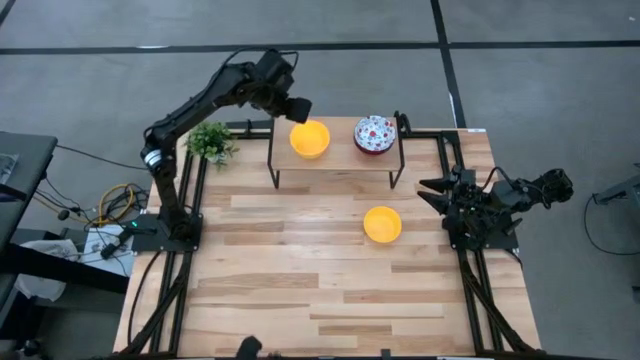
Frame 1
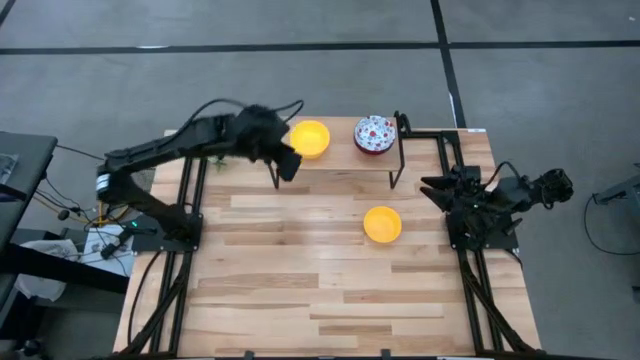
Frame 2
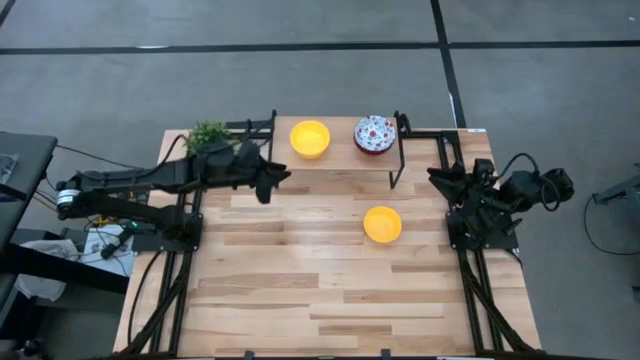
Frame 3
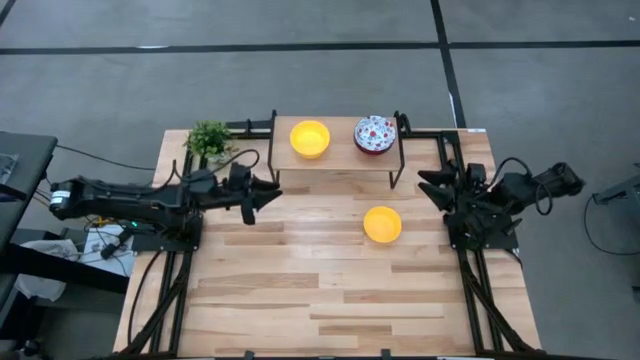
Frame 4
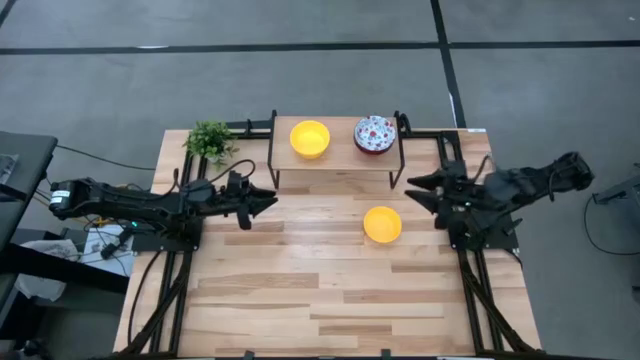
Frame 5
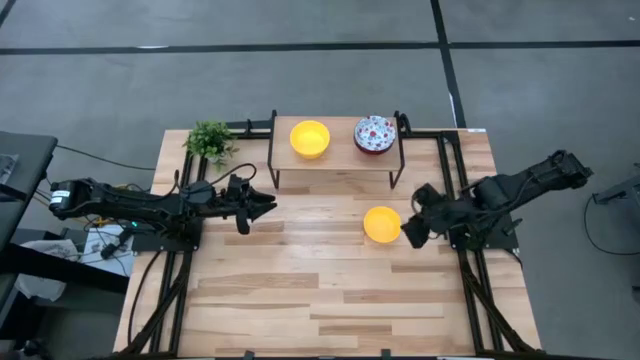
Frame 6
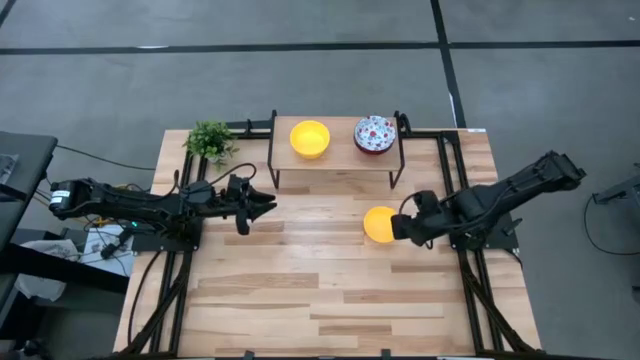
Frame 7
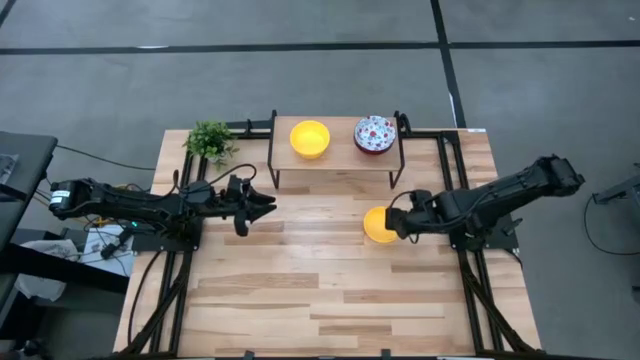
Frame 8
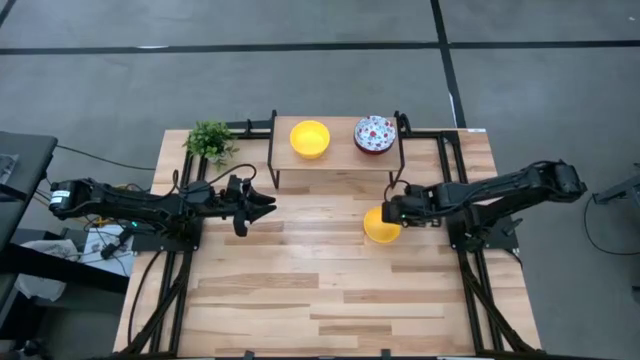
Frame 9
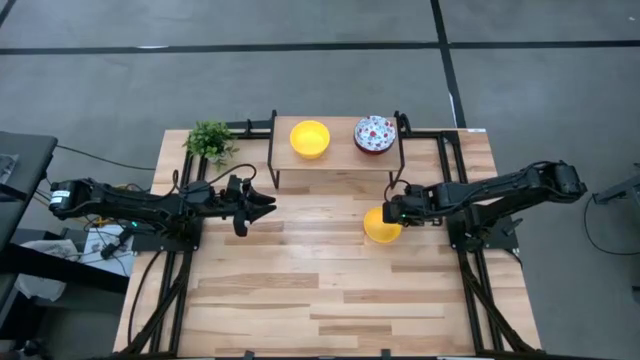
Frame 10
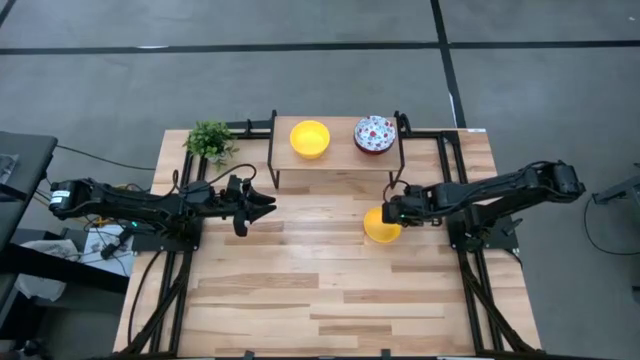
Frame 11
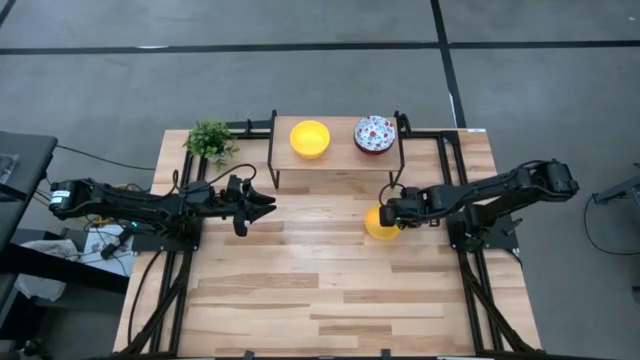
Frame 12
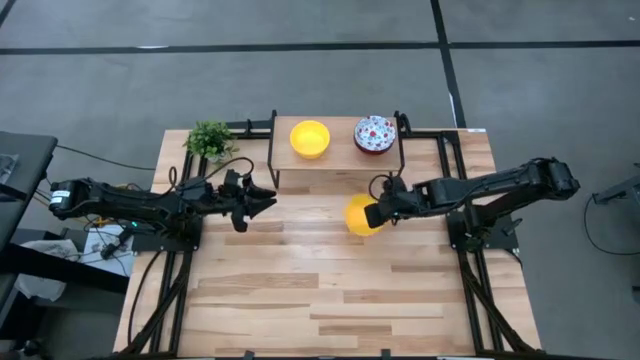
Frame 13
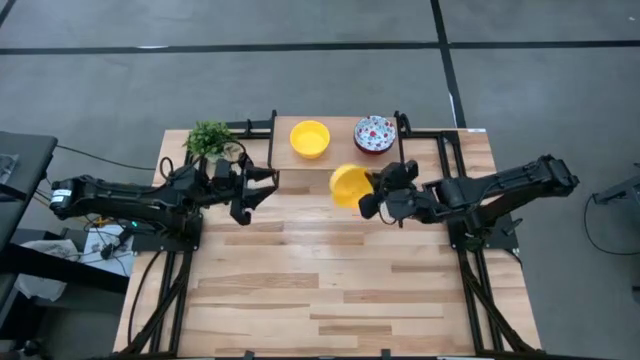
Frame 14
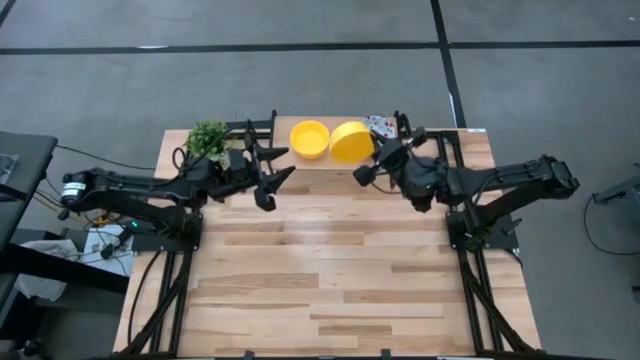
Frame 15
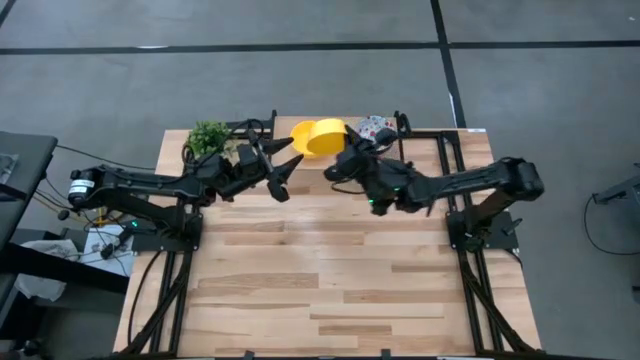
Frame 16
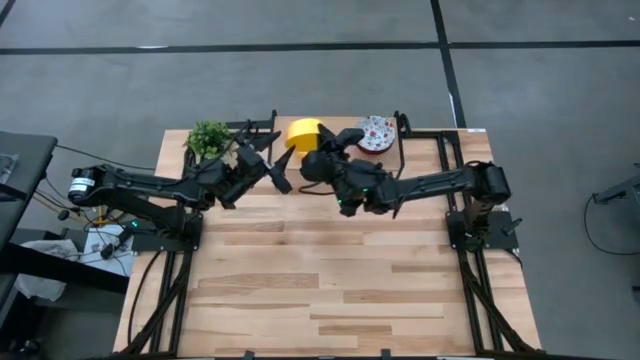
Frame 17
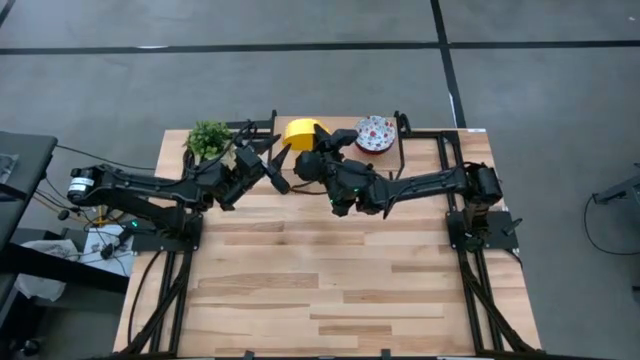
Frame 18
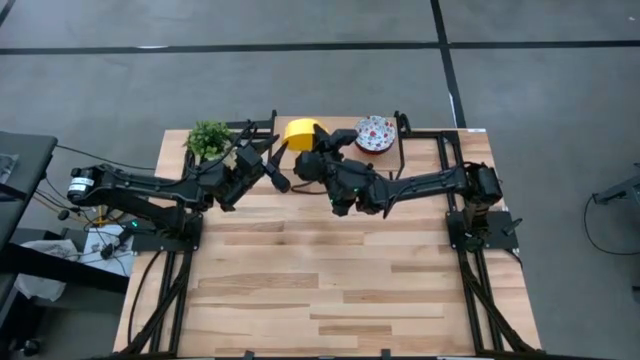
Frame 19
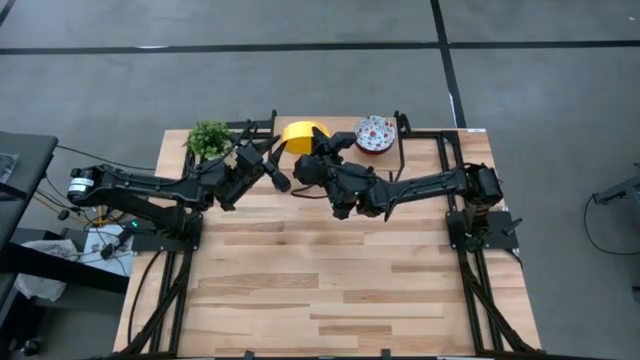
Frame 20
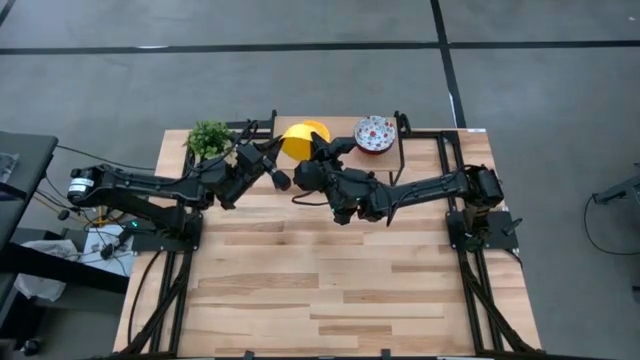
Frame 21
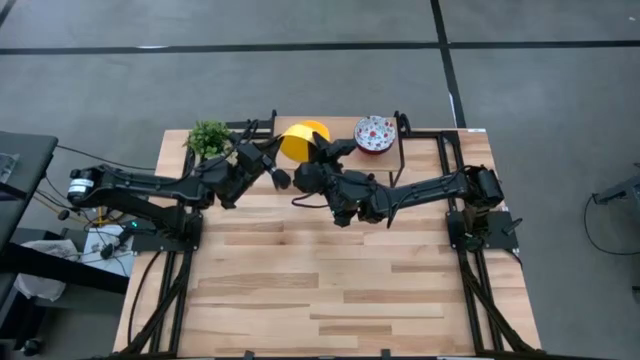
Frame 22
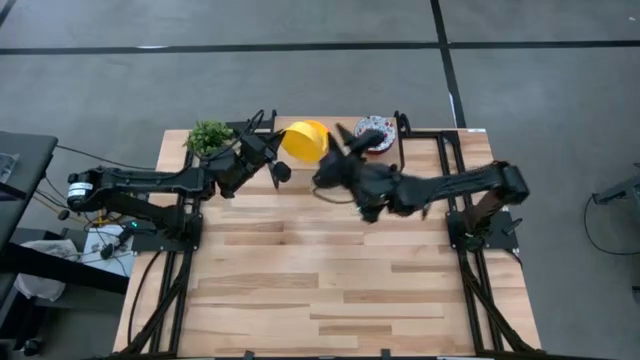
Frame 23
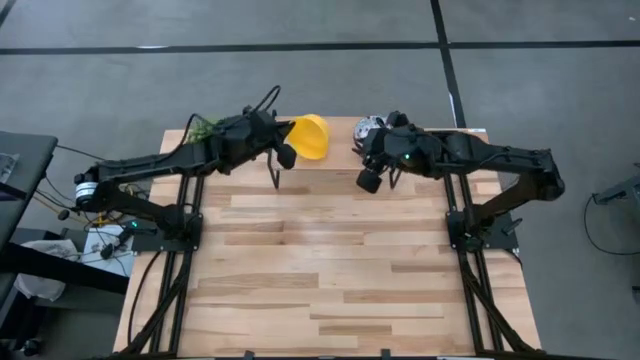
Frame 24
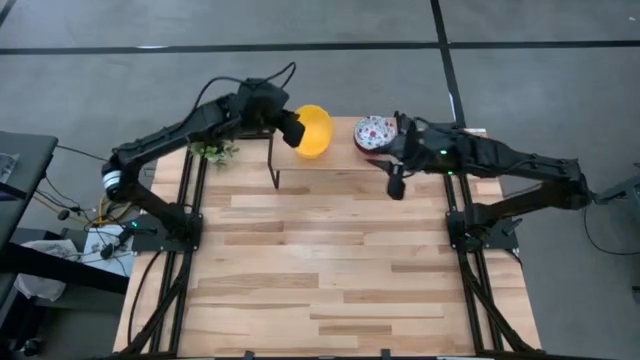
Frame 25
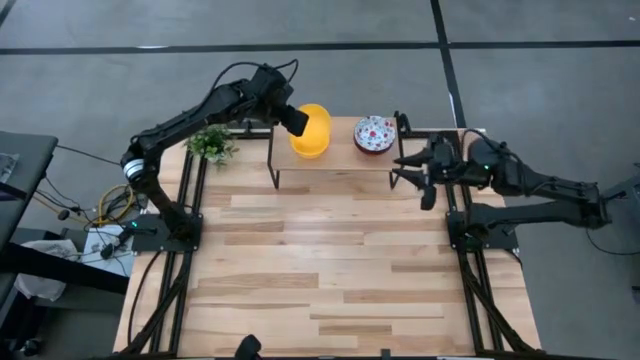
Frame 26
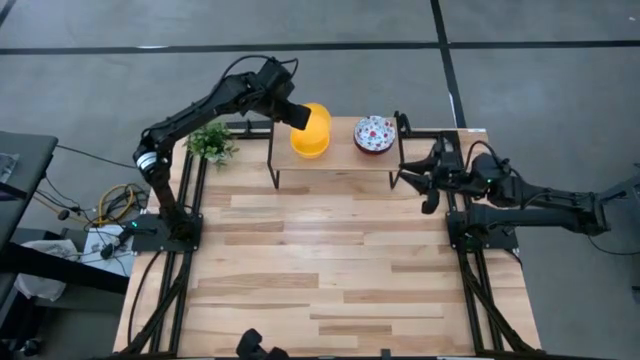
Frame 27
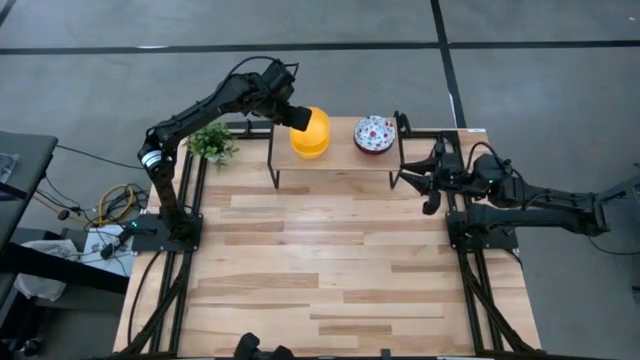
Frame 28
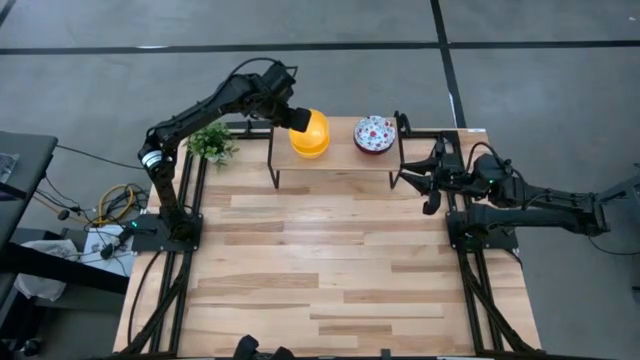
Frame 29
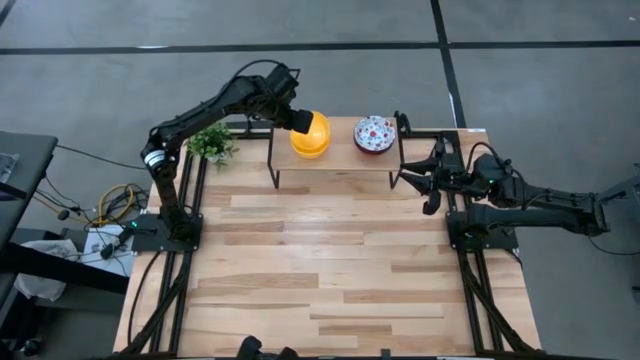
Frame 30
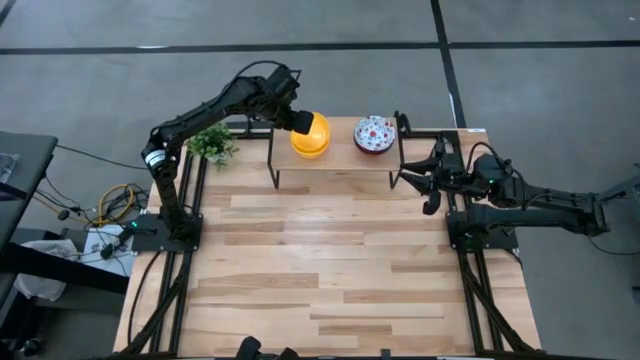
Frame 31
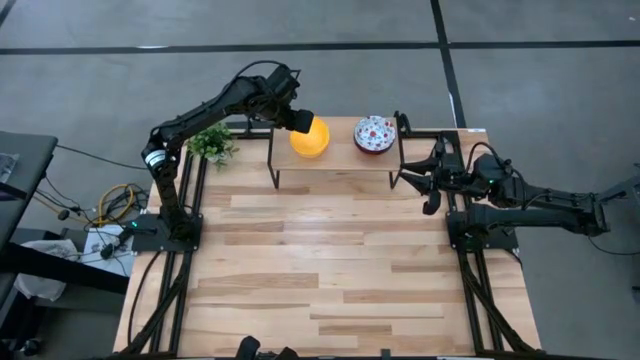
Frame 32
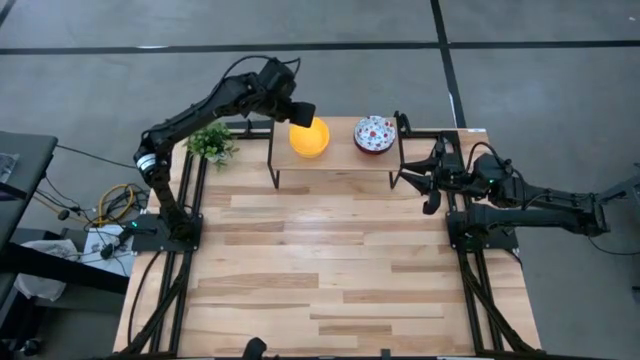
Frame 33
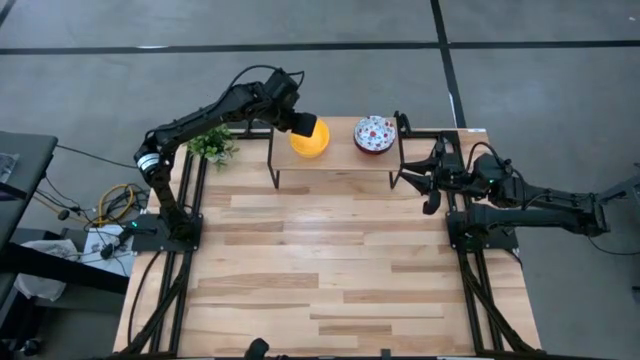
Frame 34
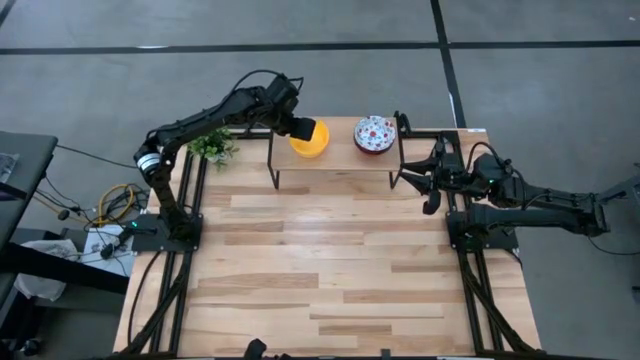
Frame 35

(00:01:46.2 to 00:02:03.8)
Task: Pick & Place Mini bowls
Stack the yellow bowl on top of the yellow bowls on the shelf

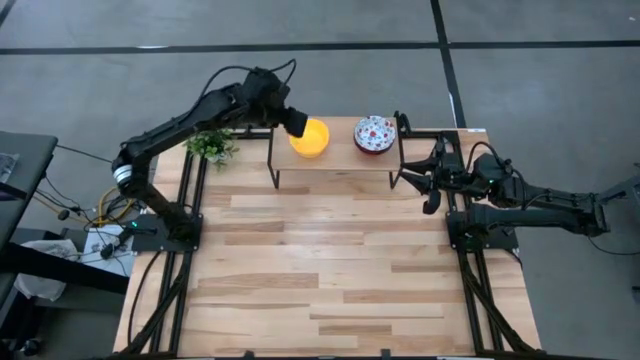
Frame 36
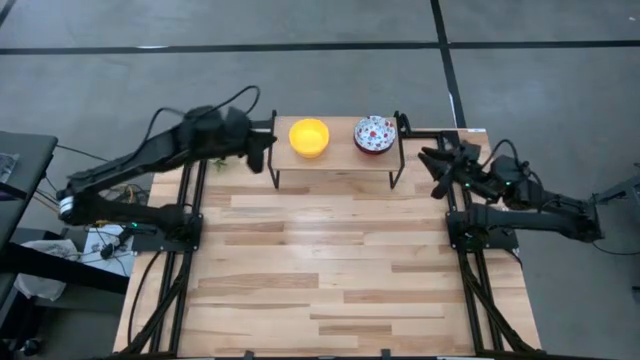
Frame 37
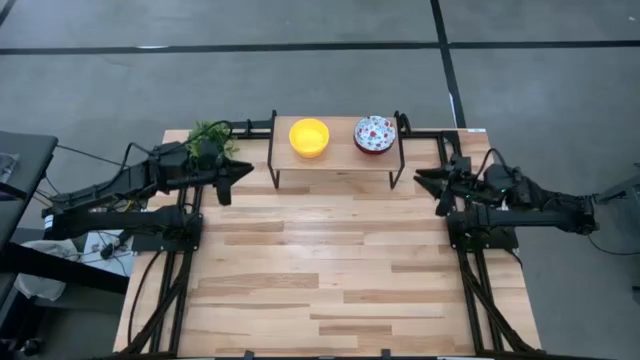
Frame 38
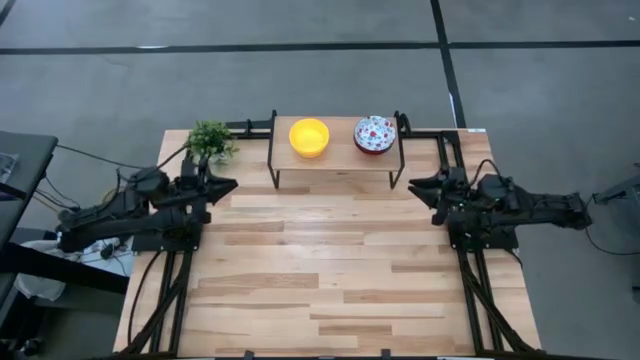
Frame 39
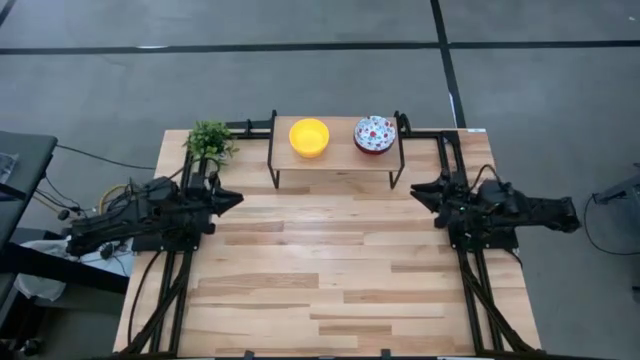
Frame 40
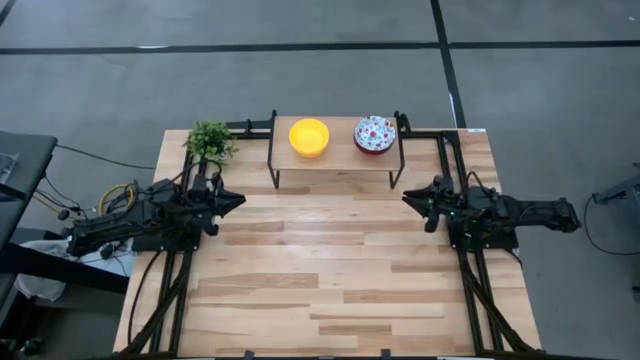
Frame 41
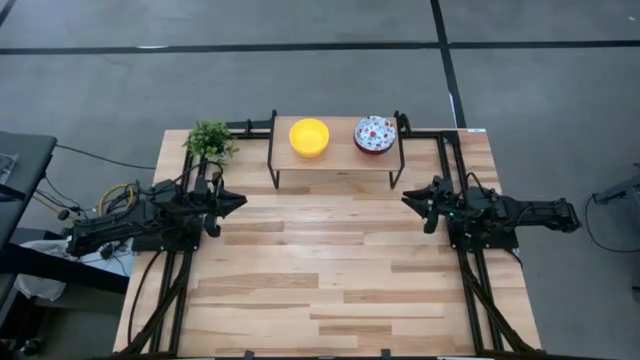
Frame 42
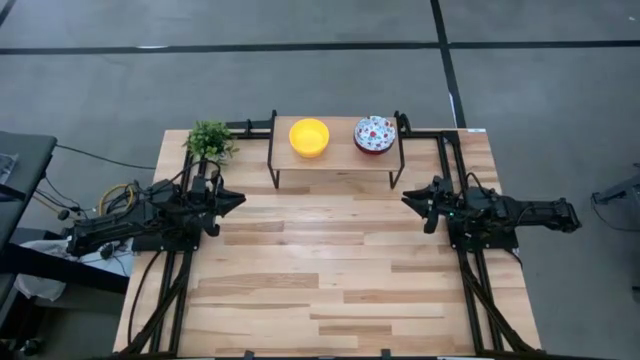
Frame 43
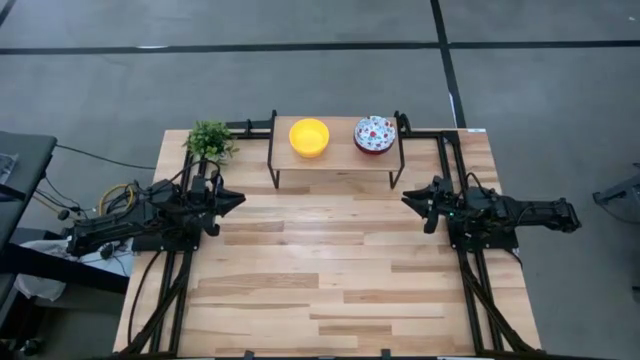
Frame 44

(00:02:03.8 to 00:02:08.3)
Return to Home Position
